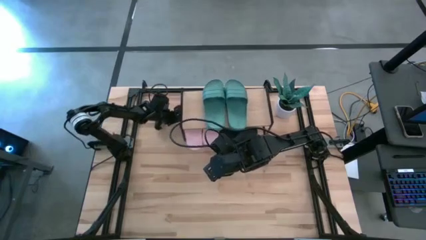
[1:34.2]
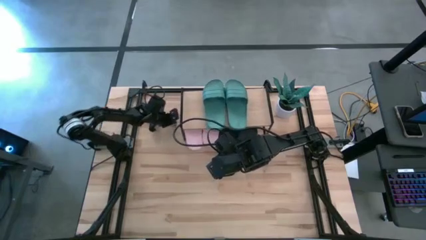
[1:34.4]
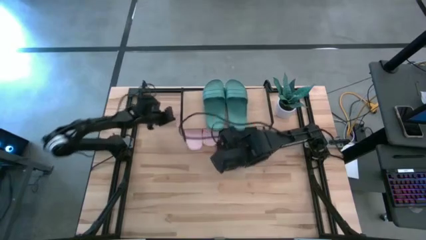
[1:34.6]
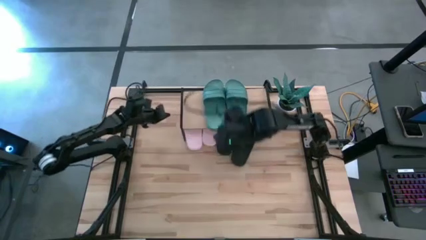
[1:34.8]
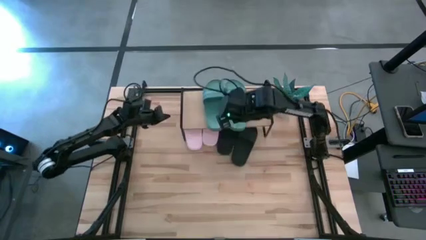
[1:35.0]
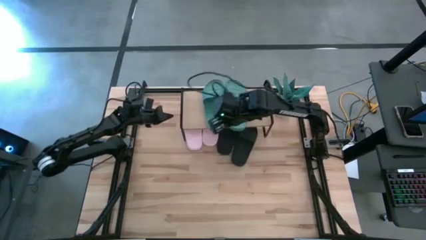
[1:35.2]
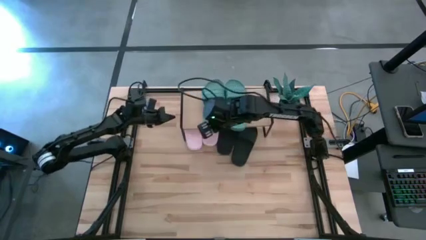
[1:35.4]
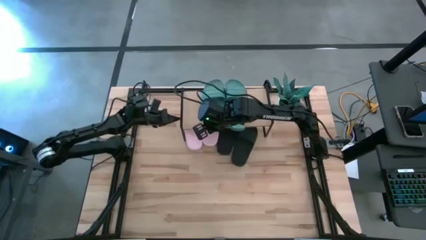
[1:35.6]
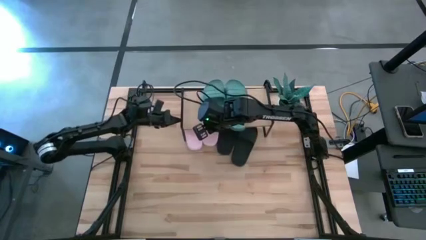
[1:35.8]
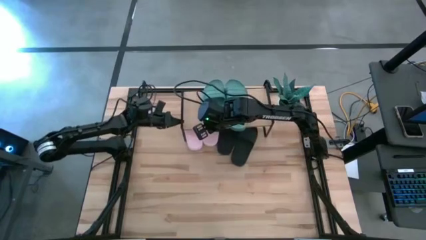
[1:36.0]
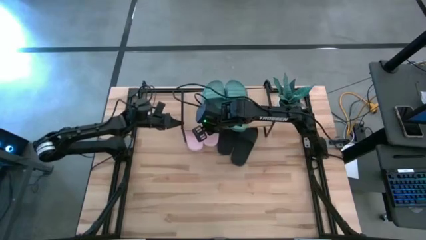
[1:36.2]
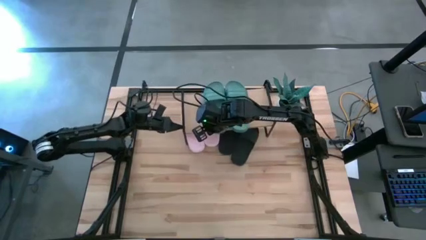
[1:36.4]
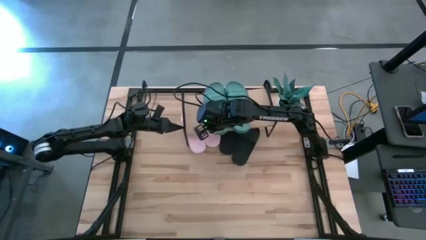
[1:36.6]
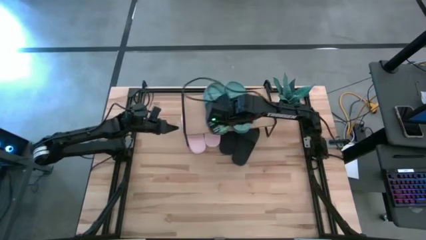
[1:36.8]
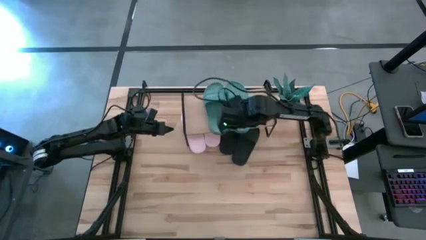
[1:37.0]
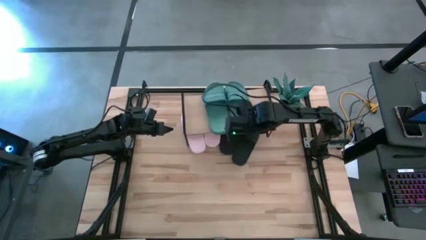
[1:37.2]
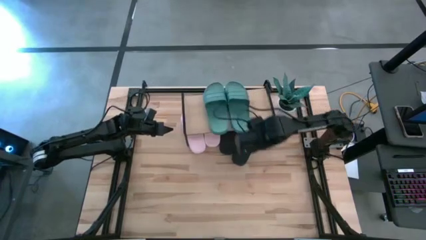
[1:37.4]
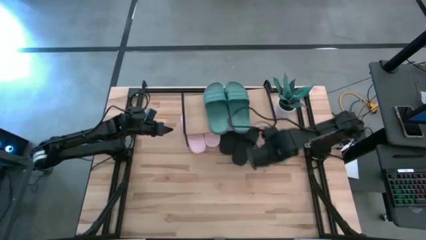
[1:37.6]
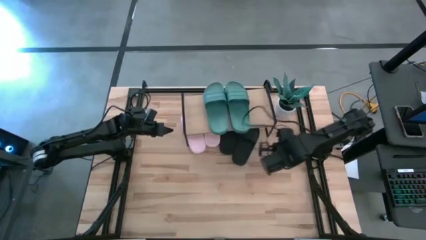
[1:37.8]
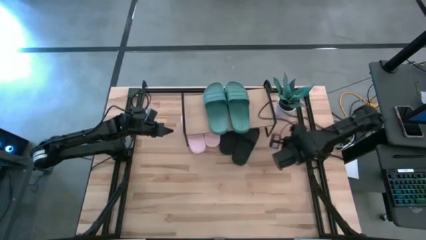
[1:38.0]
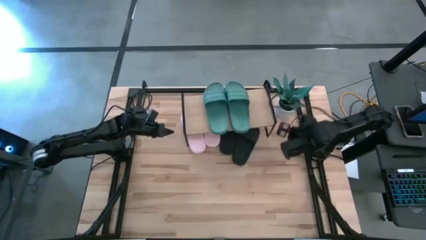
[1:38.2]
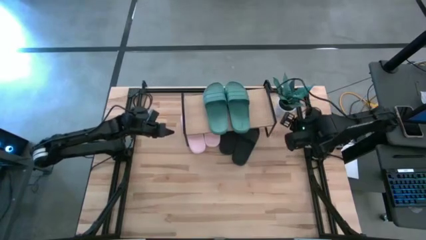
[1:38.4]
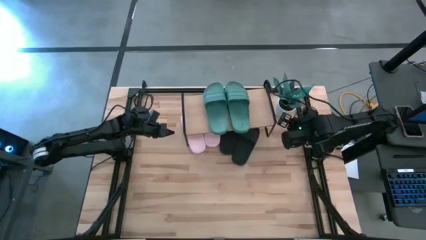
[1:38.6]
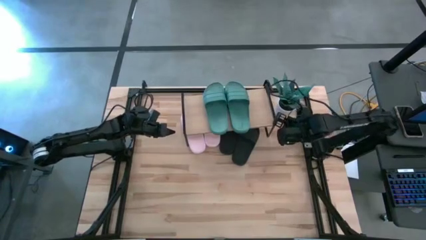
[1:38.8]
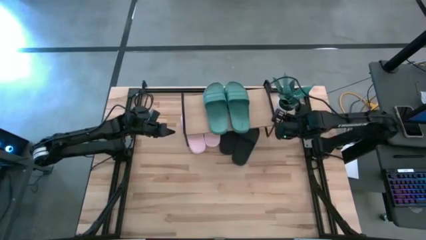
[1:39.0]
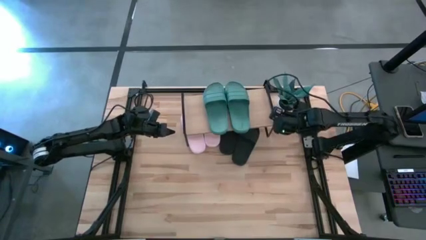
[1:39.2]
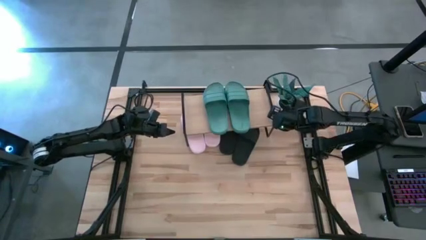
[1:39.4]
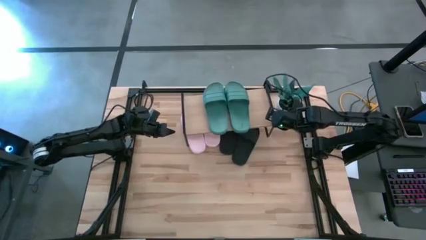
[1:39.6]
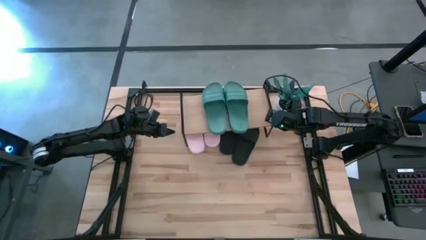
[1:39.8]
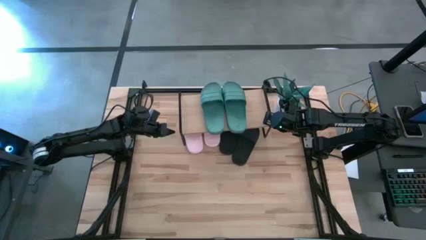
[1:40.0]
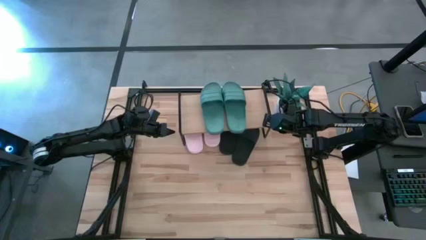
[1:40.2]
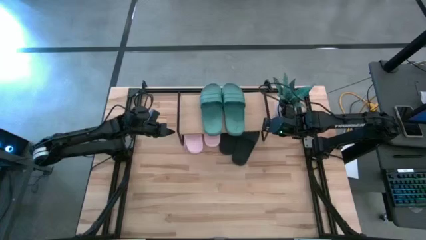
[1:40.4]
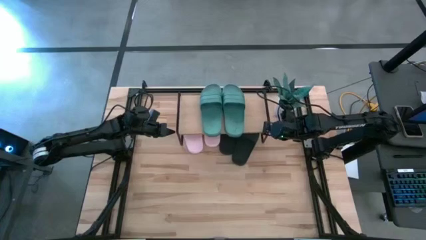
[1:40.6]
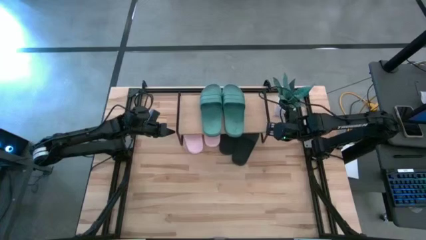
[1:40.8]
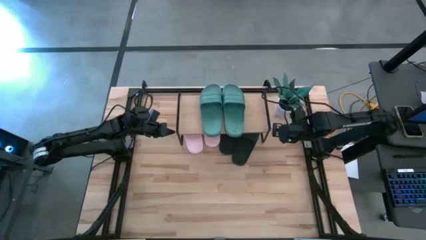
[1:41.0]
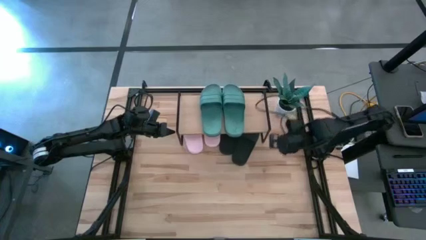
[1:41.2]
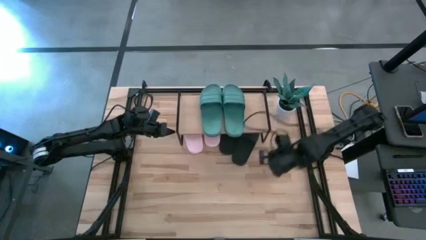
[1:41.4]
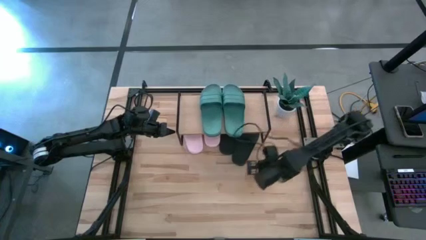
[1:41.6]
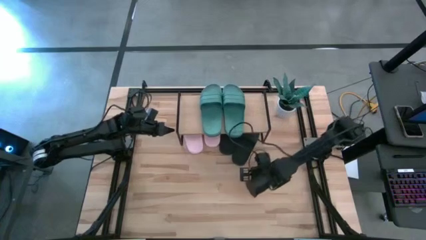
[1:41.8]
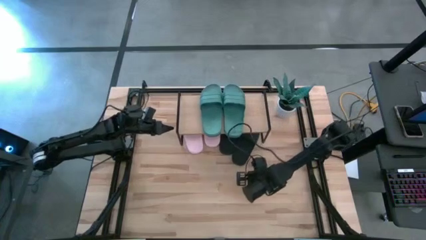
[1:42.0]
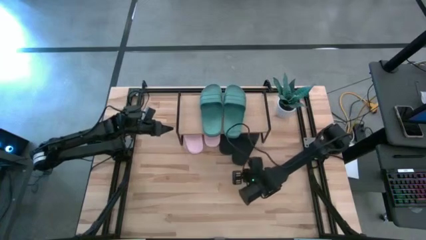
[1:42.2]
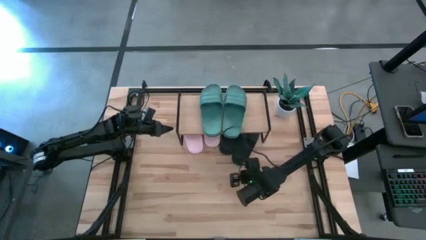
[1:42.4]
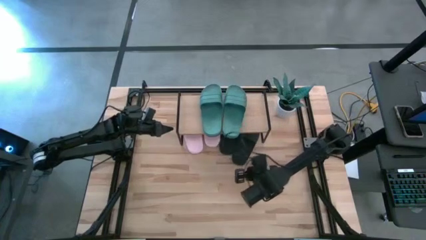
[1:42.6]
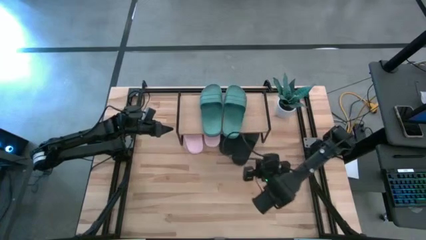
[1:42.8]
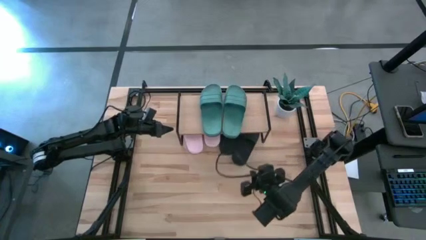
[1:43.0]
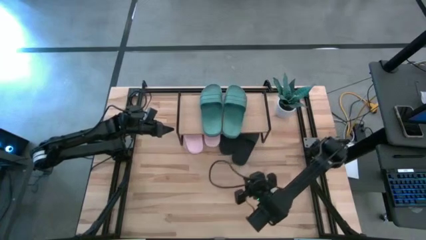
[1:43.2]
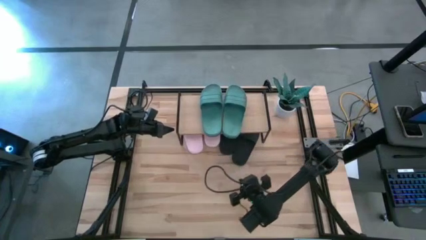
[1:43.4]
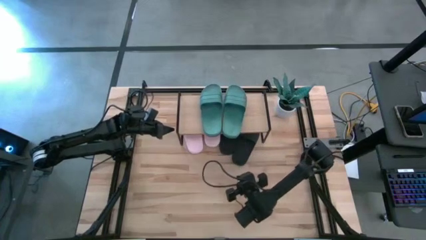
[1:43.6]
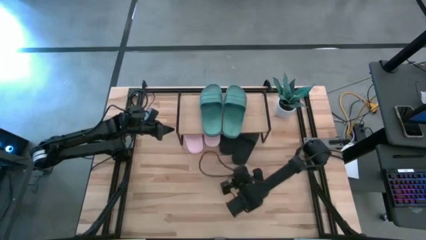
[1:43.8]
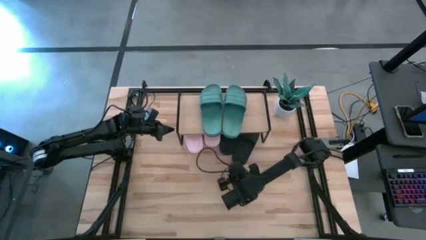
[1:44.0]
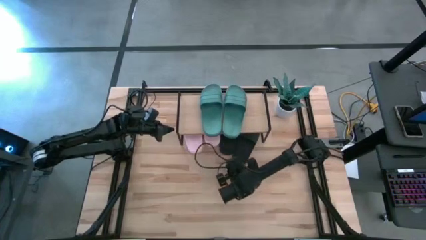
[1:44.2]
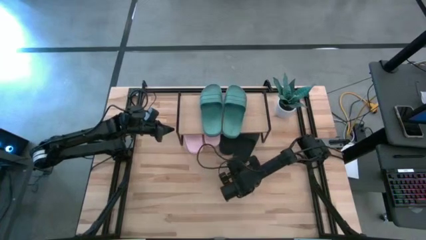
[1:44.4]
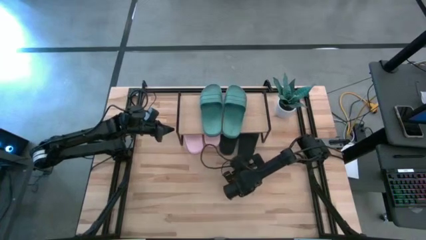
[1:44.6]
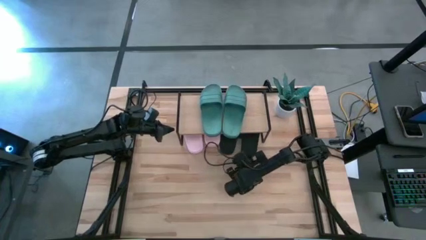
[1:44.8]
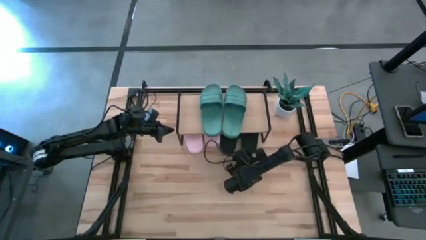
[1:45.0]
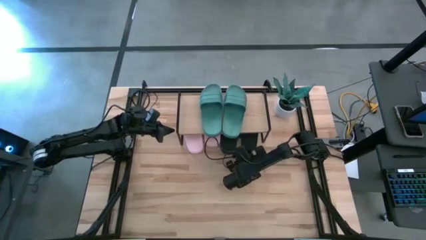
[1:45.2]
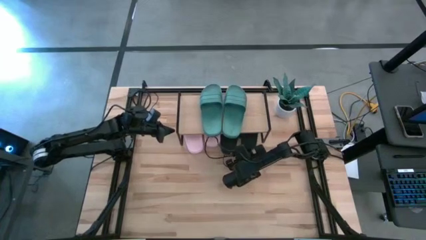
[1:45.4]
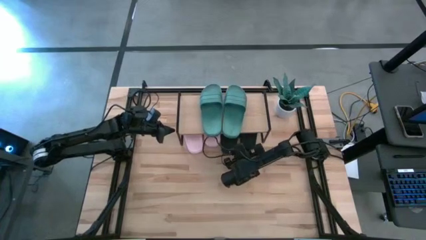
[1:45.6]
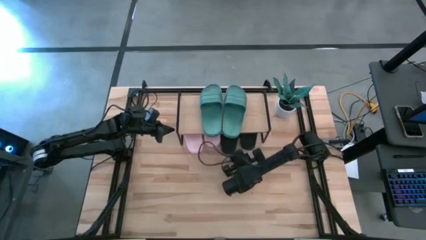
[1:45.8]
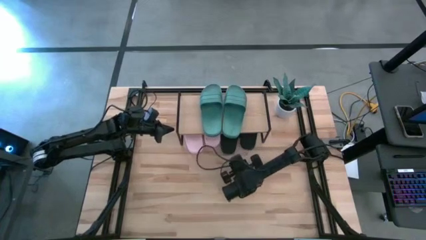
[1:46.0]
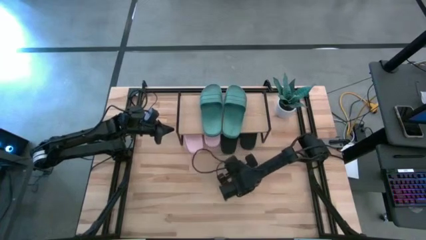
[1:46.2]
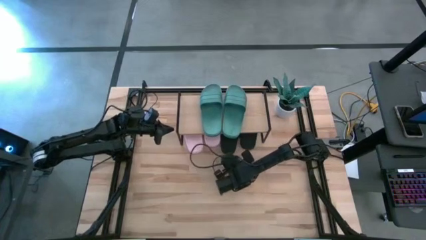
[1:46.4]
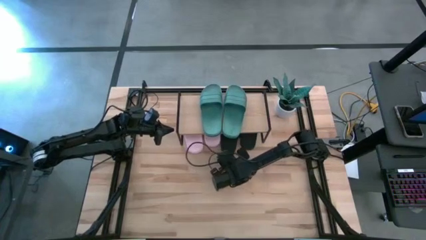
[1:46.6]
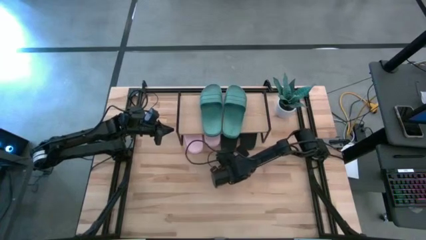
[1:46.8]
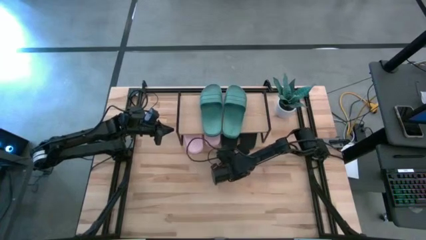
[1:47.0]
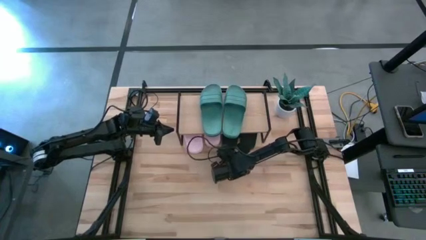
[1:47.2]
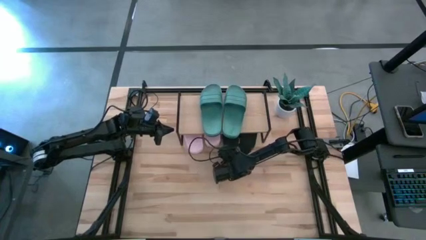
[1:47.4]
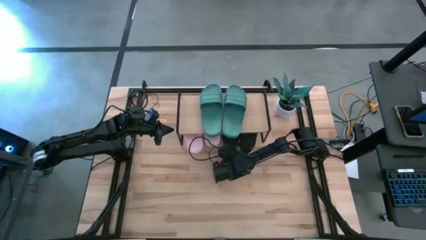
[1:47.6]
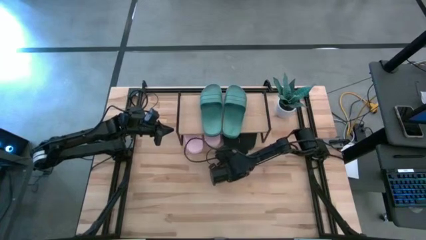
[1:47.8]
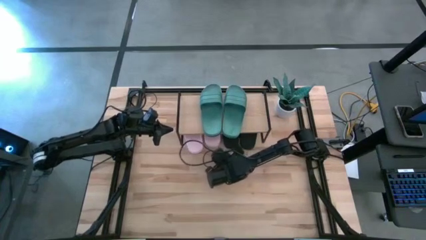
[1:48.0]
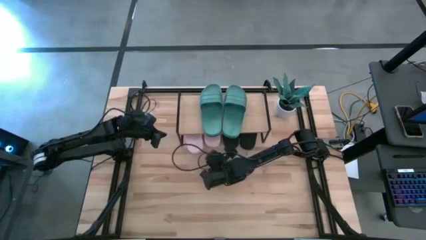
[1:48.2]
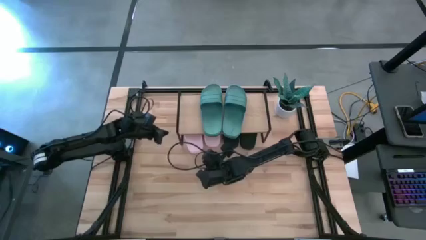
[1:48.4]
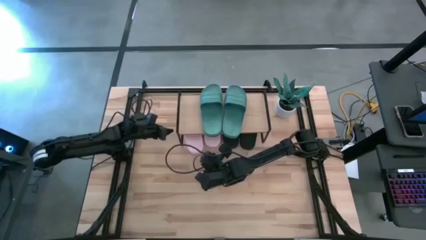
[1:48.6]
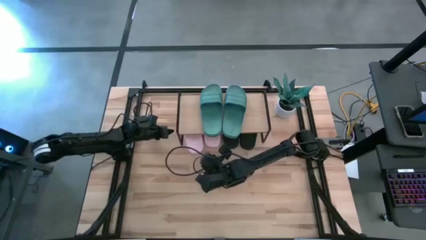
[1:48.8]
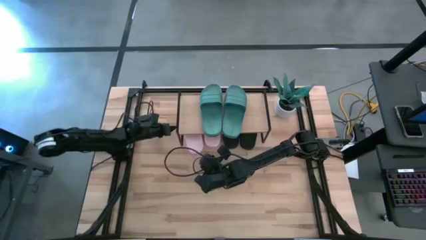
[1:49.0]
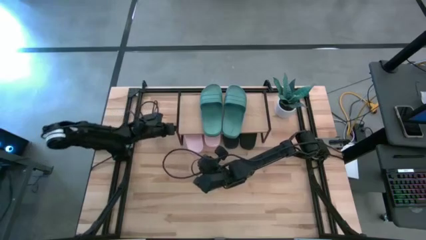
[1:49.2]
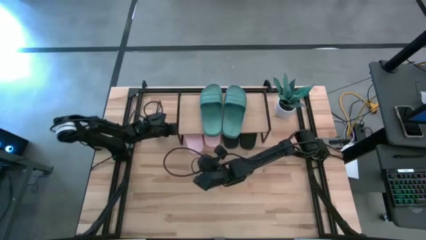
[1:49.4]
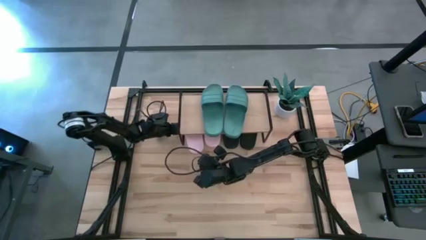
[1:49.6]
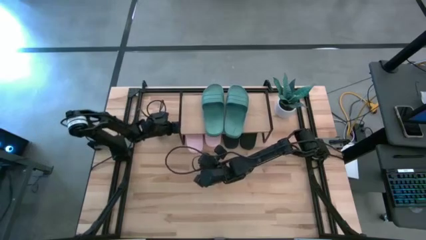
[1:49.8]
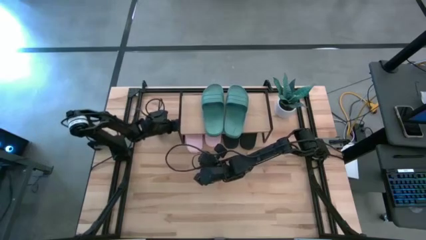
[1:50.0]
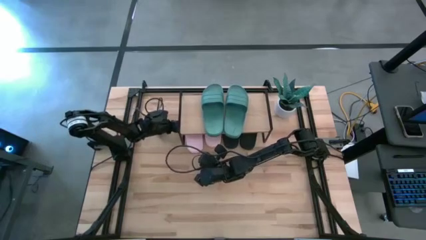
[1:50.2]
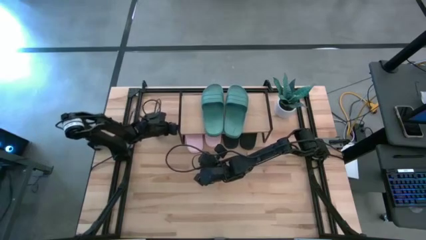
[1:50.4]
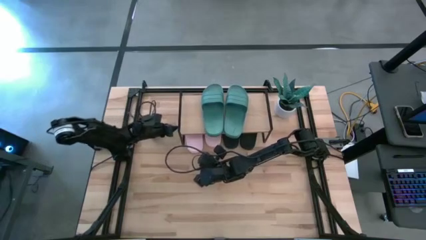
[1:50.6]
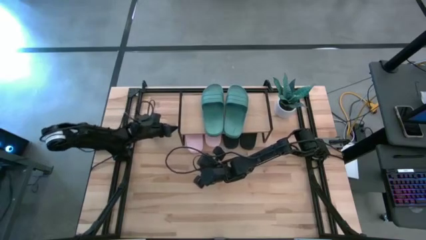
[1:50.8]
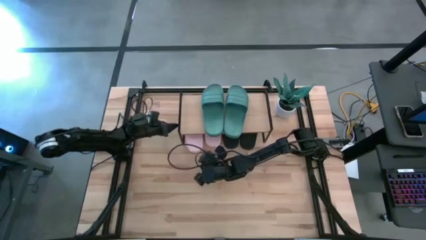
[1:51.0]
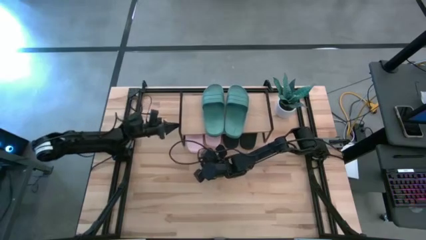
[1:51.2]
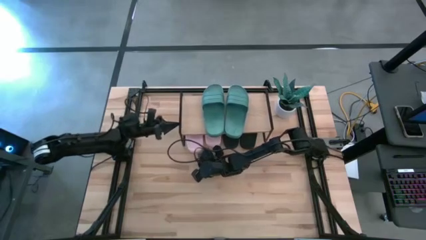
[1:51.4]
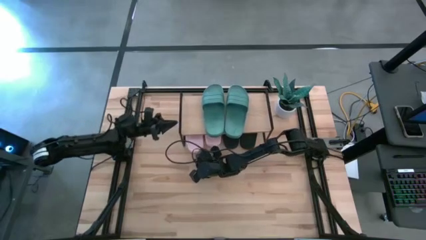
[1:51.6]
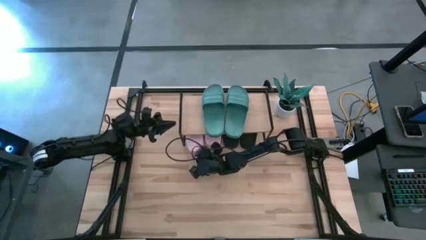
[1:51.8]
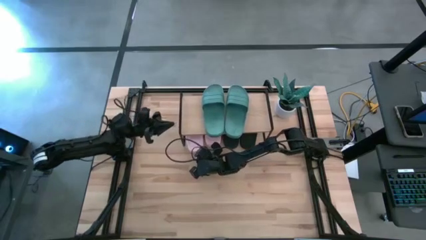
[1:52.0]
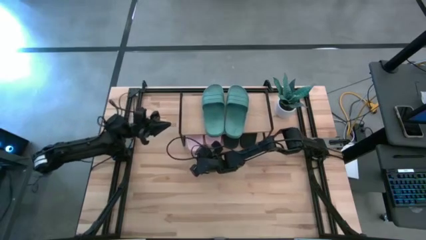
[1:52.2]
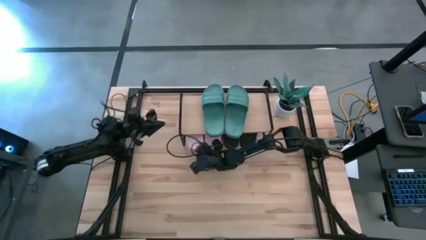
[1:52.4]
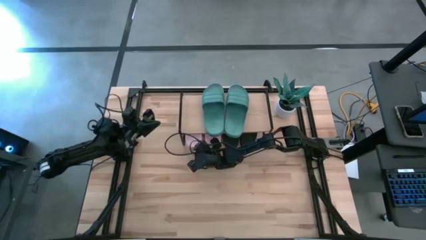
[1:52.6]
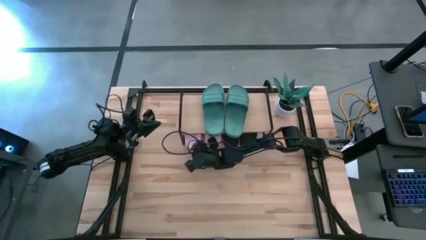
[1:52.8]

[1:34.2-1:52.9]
Task: Pick and place slides into the shelf
Adjust the slides under the shelf
